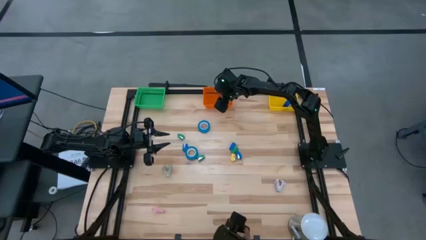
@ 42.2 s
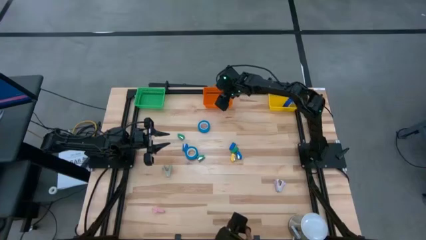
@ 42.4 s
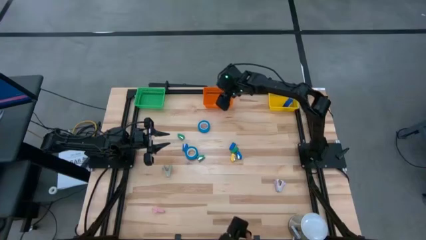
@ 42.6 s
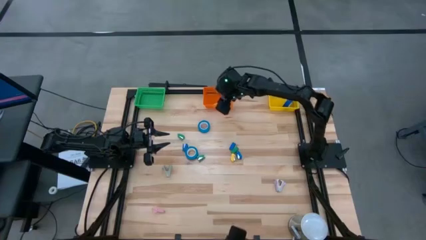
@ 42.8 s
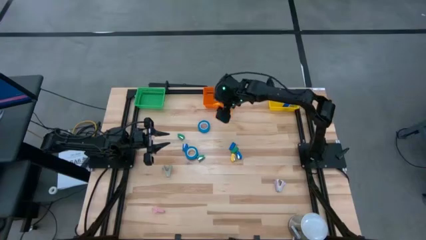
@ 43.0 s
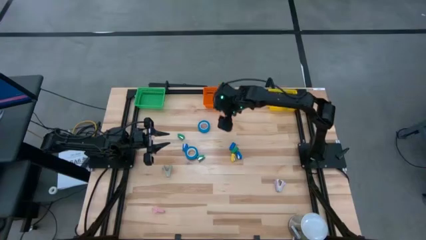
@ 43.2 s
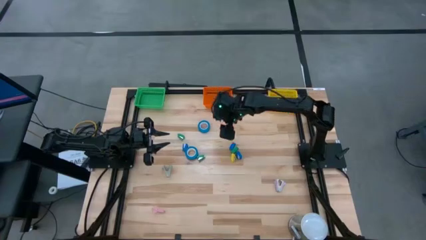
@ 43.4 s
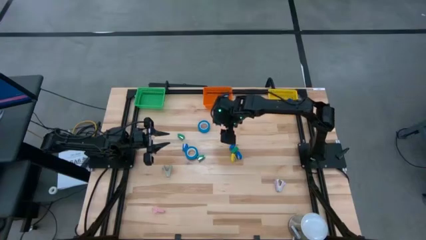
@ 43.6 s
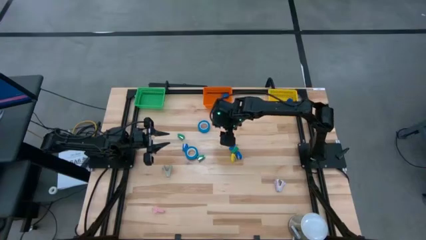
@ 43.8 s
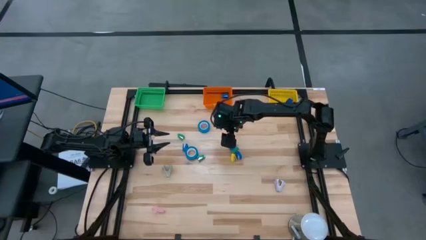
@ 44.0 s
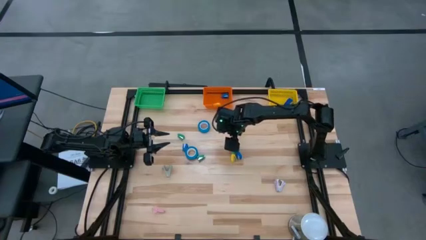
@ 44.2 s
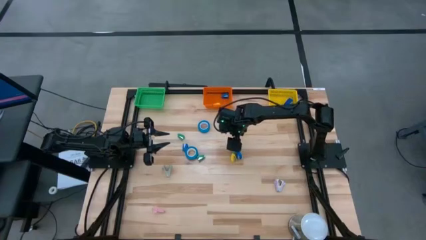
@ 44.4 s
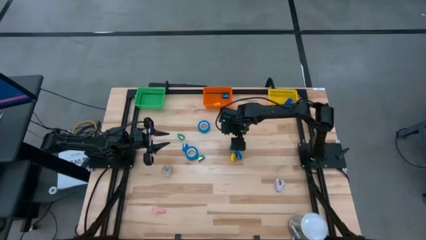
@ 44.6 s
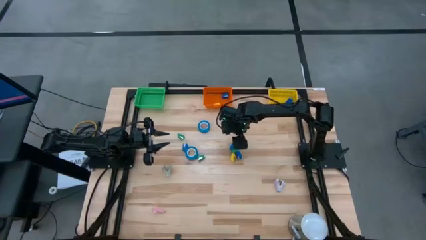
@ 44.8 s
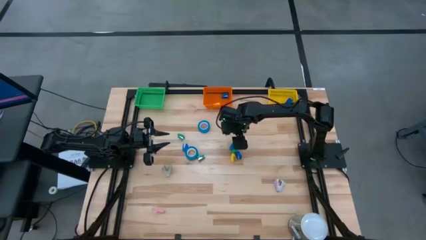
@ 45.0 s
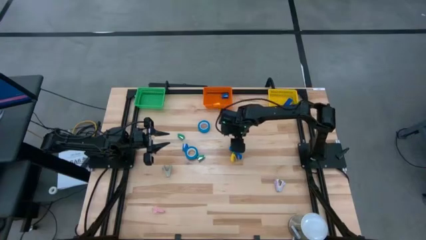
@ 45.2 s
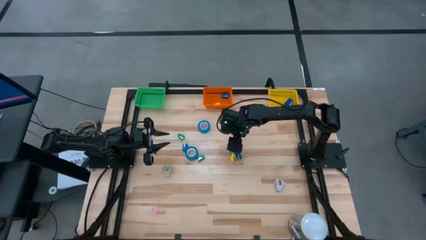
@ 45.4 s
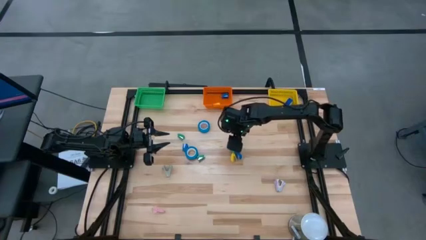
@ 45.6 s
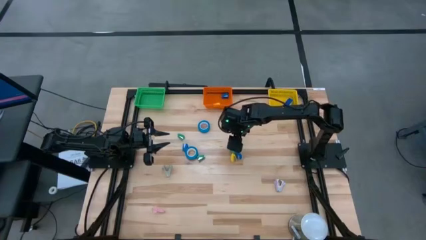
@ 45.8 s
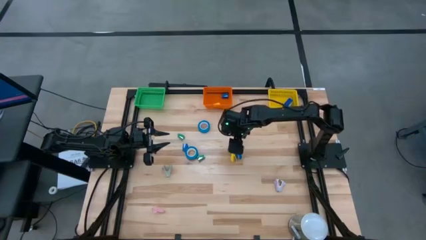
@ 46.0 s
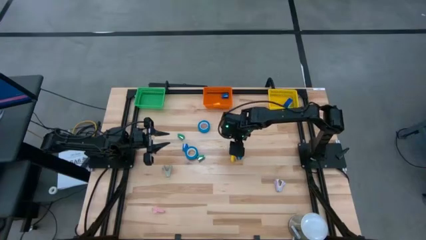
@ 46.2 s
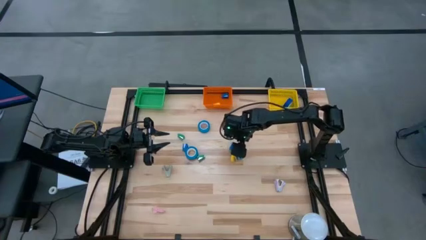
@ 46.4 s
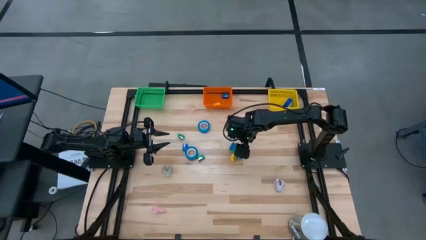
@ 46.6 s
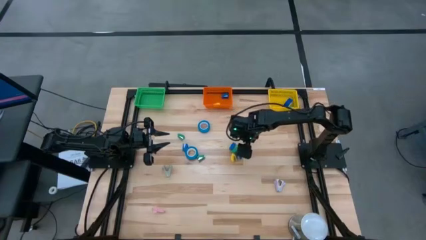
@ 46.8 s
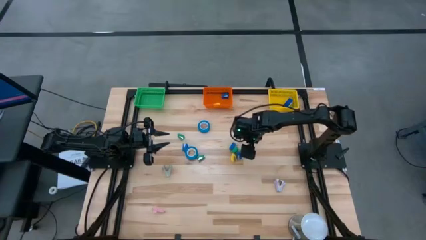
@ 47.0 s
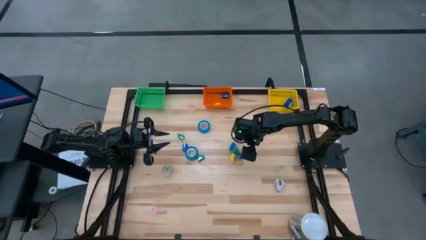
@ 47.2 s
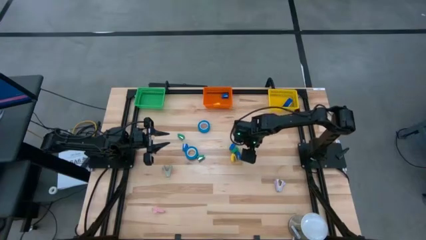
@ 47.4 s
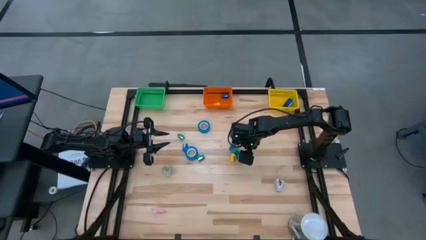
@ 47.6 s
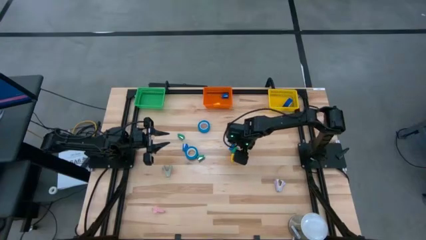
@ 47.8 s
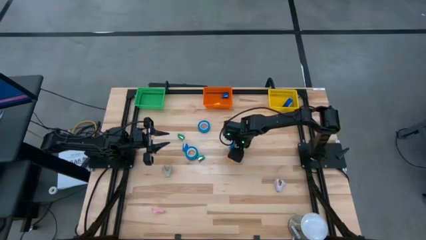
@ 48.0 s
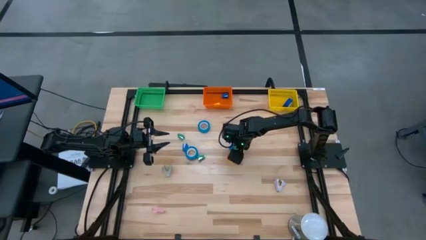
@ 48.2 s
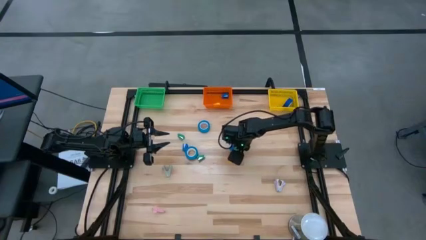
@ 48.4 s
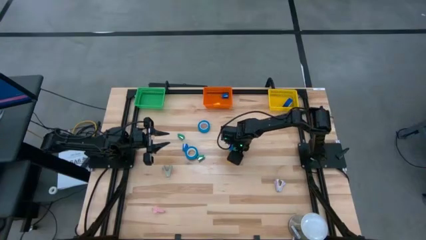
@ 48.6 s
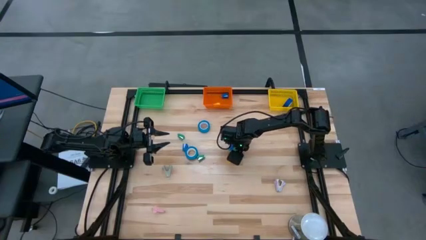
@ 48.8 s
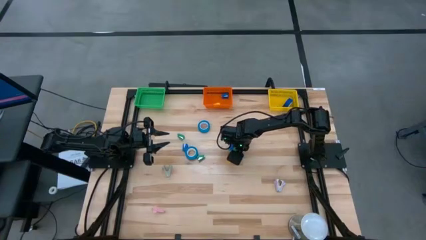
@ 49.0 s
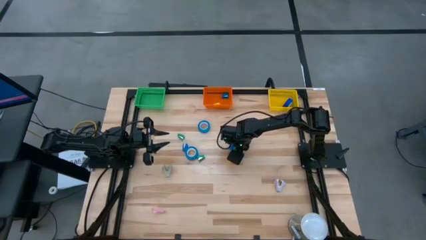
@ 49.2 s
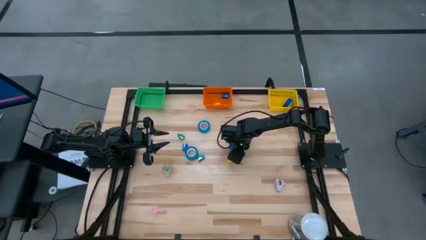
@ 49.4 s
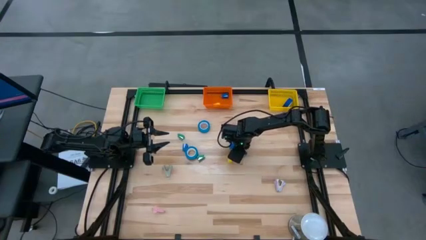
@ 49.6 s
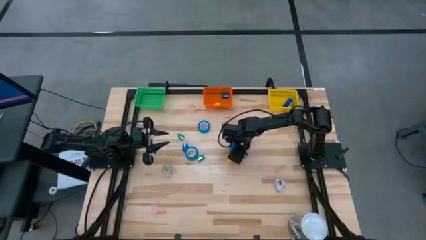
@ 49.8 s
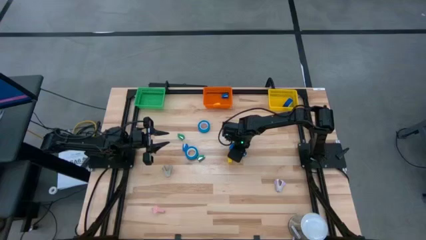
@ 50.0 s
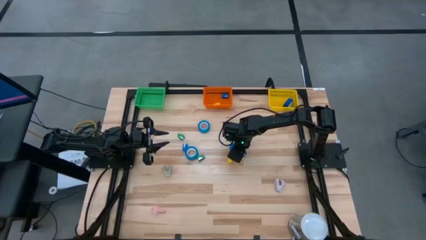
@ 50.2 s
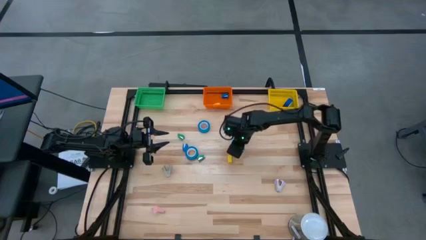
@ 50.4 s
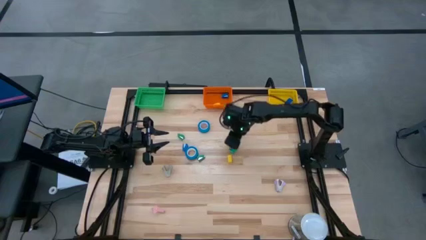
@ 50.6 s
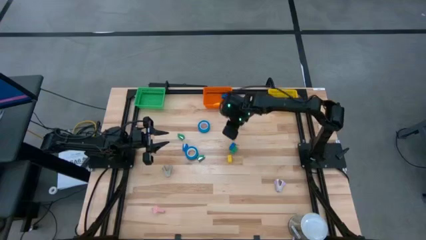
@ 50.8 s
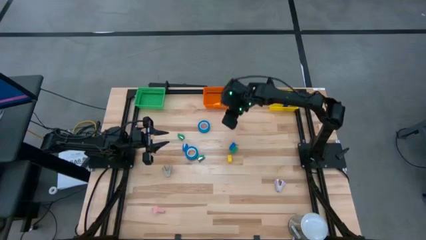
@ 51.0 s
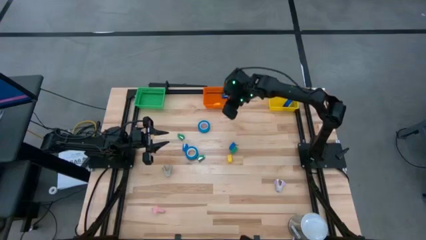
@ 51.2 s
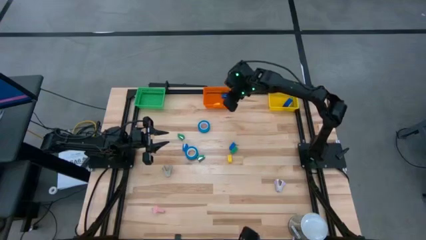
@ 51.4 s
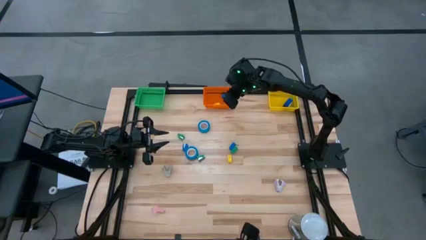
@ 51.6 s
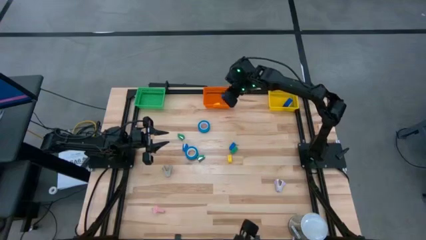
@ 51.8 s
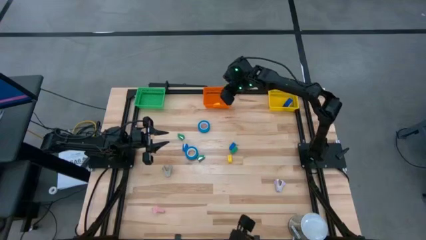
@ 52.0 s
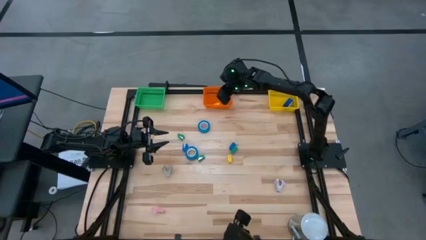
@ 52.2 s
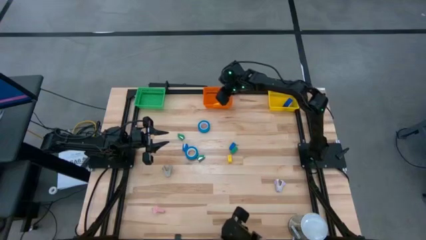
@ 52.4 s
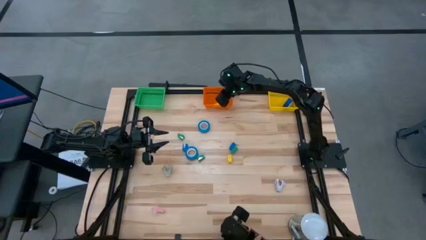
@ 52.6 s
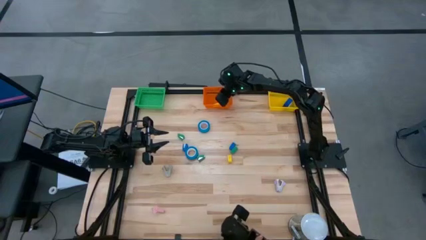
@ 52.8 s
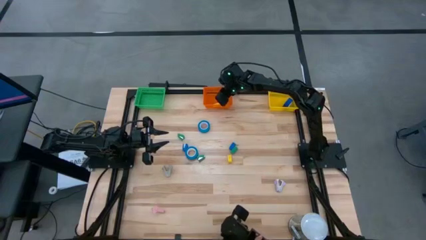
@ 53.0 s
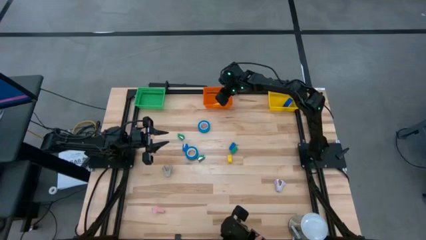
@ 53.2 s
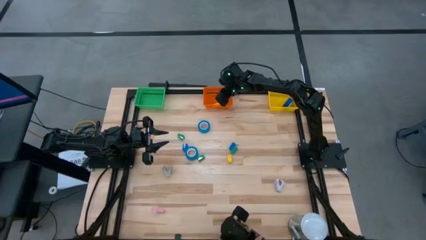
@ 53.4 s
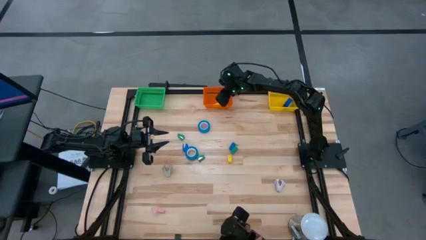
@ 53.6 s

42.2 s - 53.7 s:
Task: Pick and place Stapler, Stapler remover, tape
Put the blue stapler into the orange bin

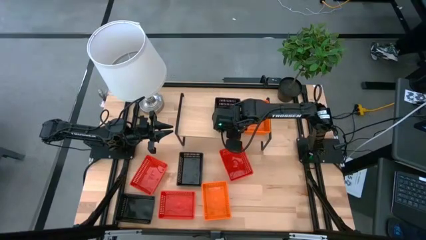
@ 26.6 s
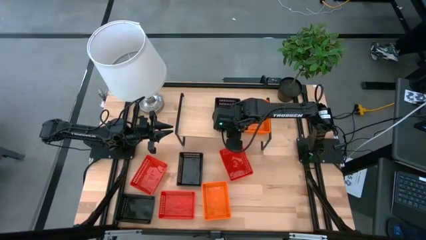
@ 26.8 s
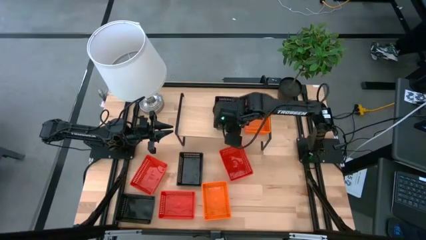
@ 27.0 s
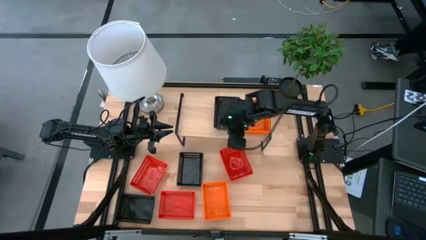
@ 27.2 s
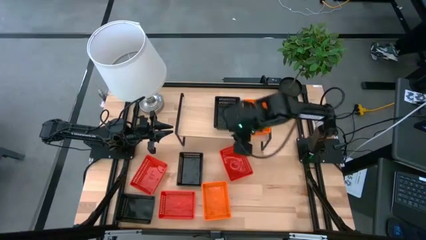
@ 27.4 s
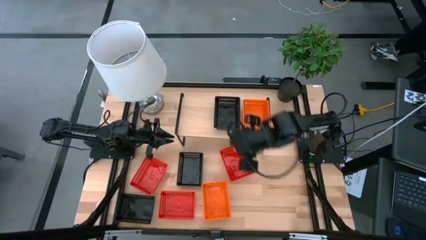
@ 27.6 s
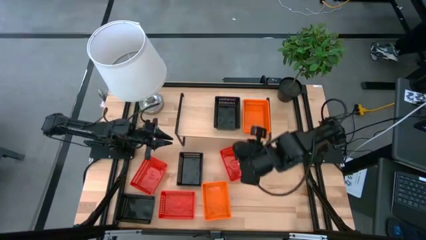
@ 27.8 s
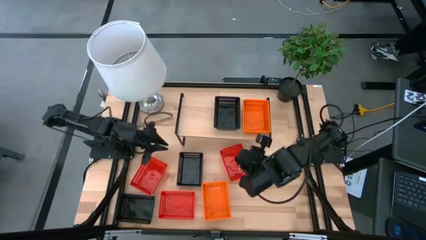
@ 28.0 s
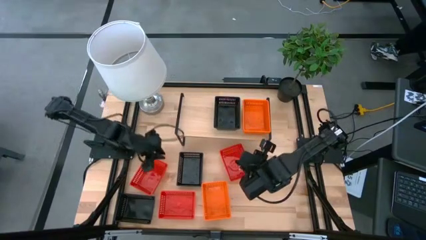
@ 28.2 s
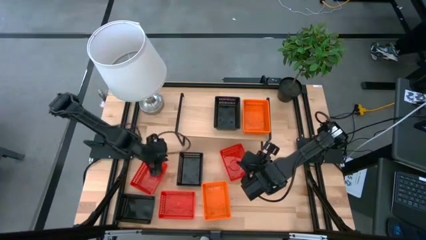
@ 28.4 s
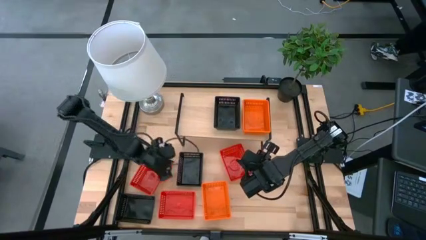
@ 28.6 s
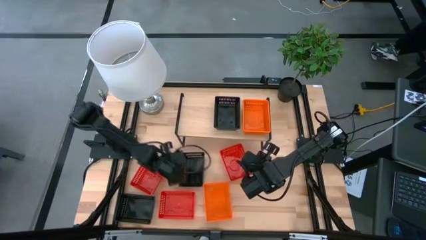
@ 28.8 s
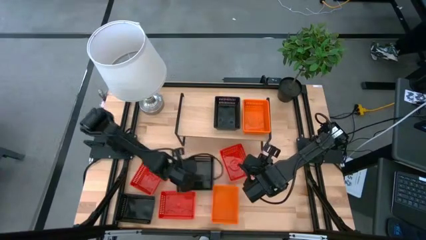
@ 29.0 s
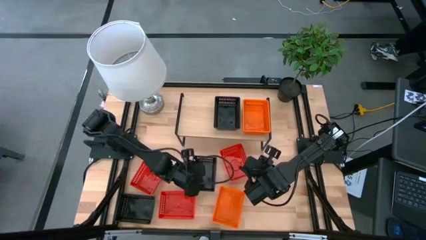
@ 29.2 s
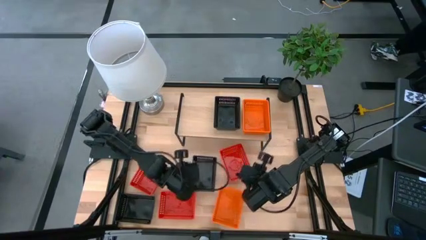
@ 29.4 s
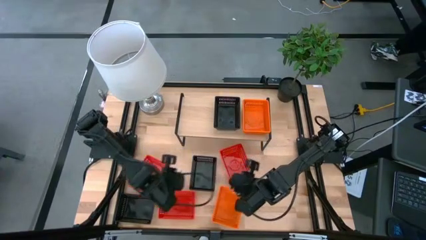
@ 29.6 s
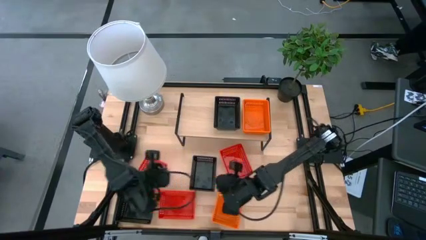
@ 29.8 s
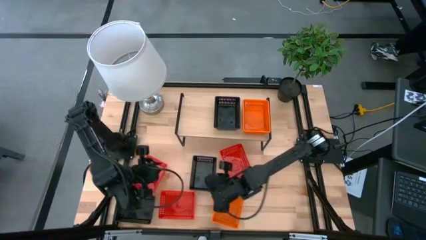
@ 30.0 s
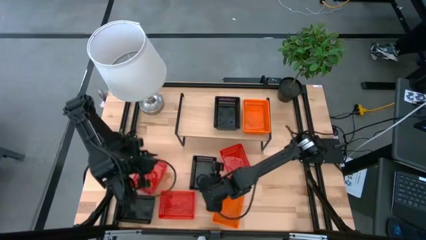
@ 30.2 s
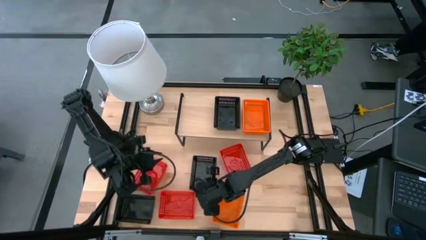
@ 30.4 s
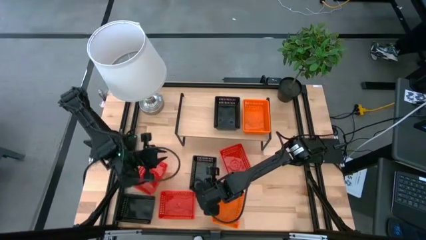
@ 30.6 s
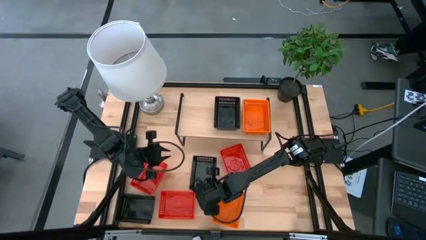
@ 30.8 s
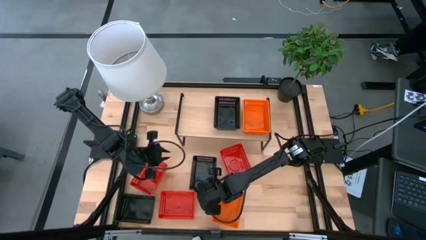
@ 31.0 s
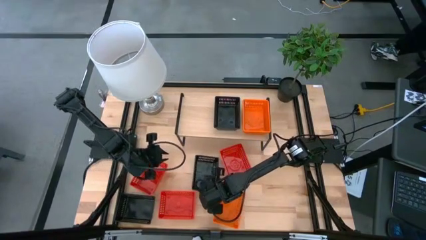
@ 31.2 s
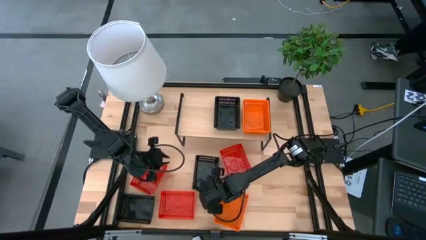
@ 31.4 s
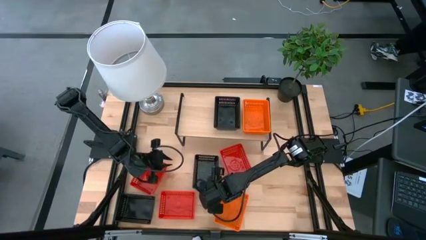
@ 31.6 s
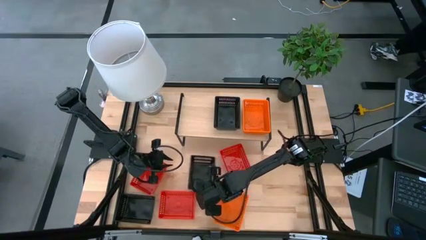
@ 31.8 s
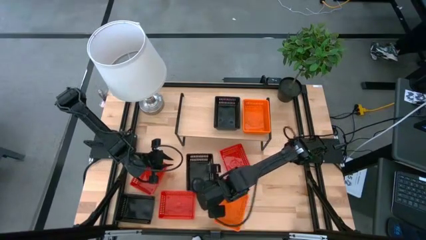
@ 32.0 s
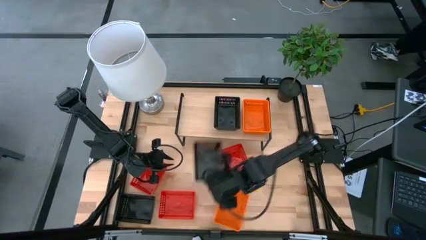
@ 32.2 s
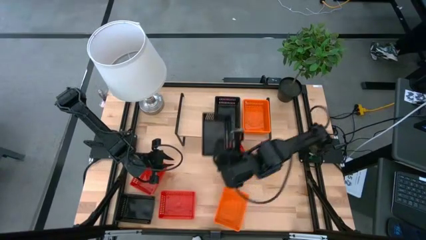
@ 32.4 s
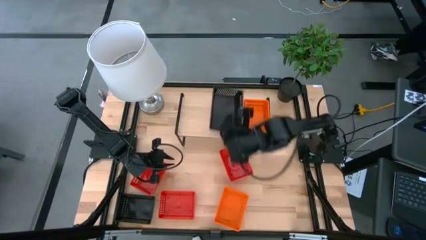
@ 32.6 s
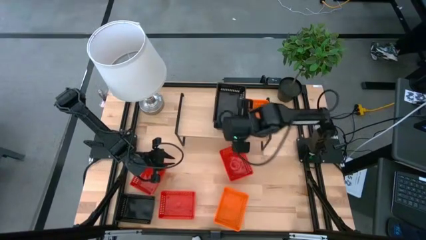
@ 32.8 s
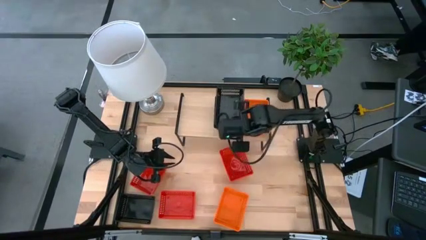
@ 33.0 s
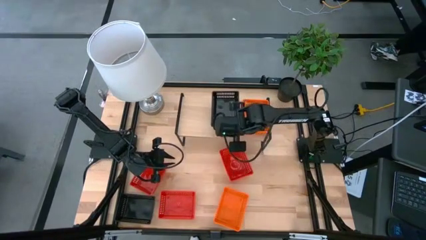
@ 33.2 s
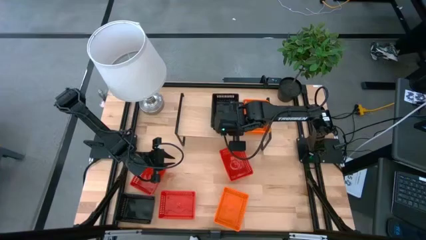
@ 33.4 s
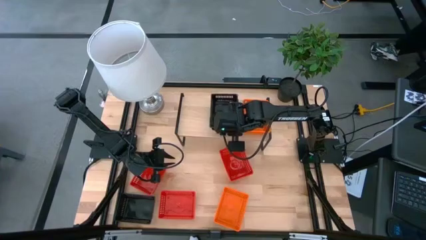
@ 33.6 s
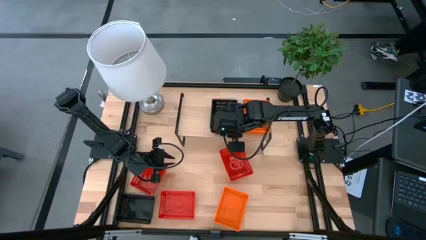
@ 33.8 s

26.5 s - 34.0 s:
Task: Stack baskets on shelf by color
Stack the right black bin on top of the black bin
